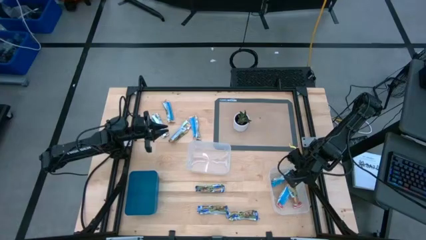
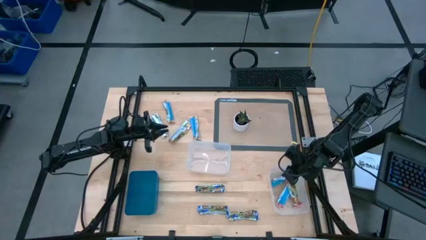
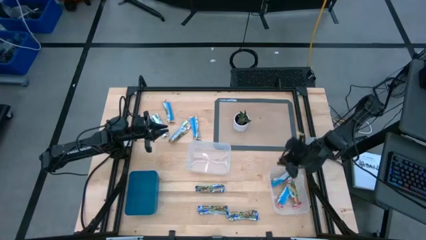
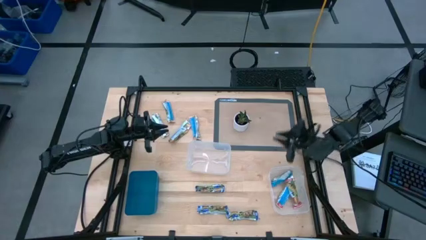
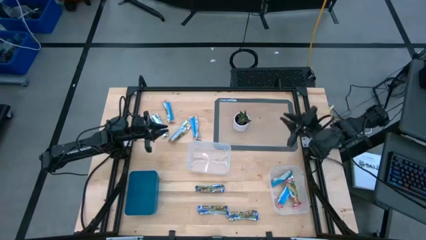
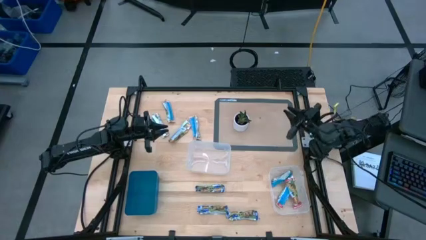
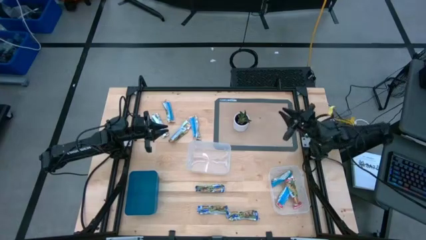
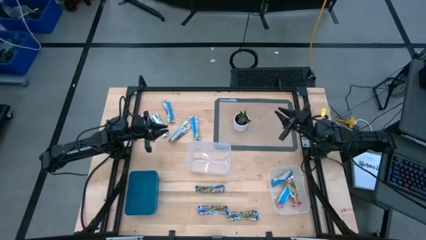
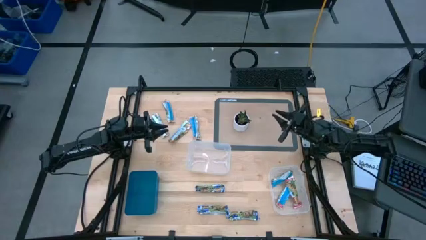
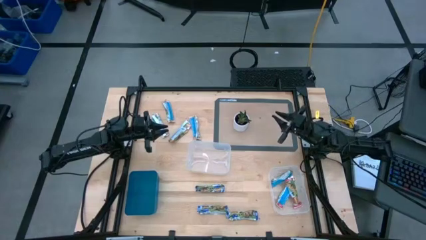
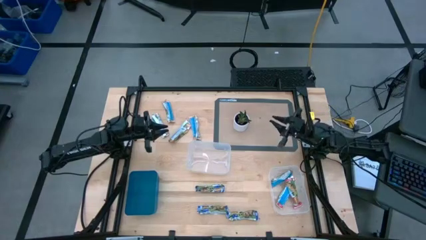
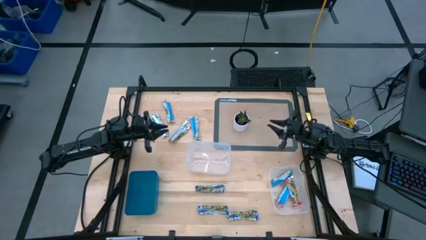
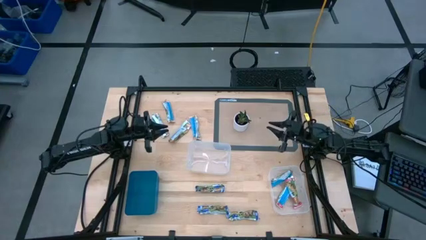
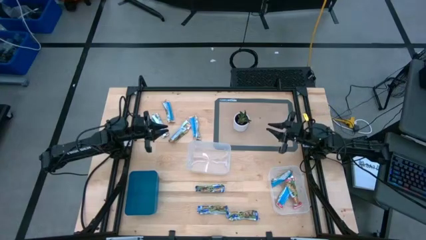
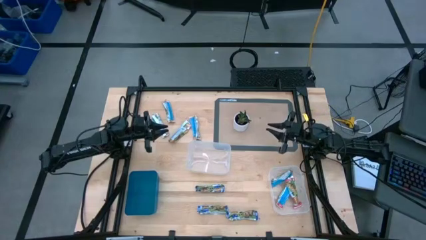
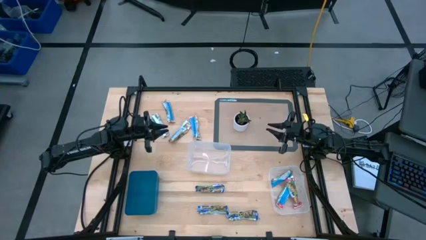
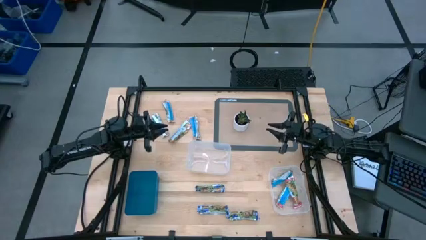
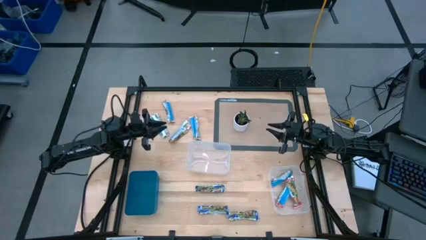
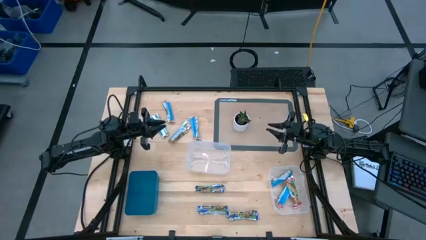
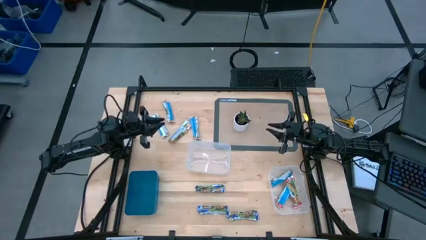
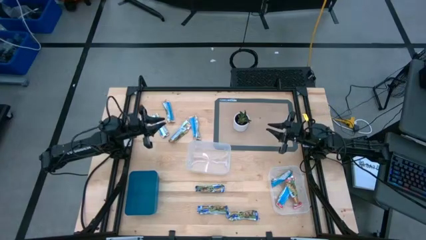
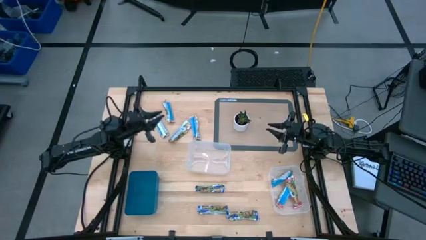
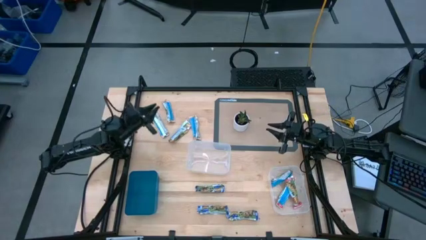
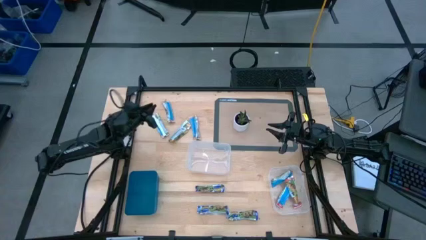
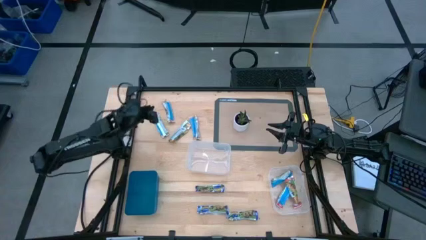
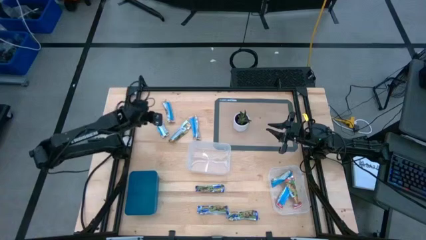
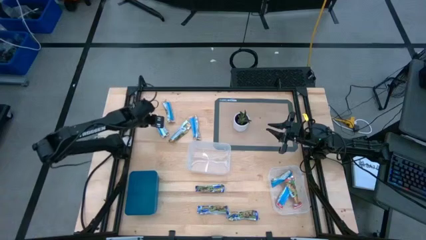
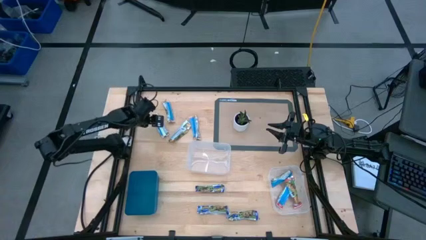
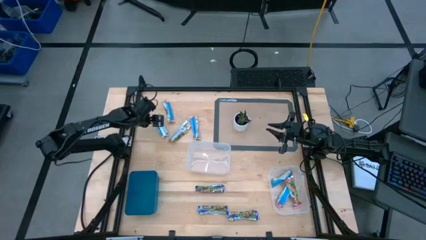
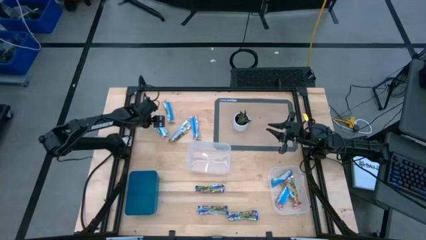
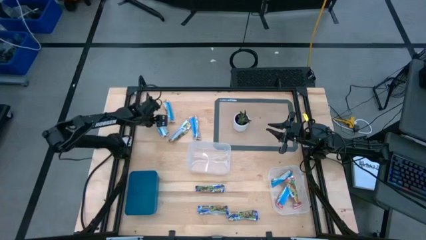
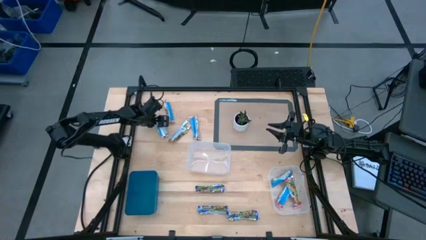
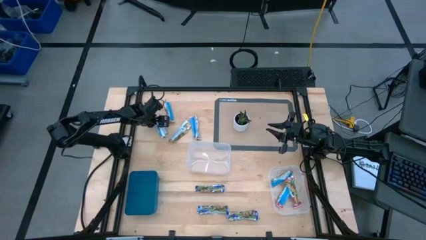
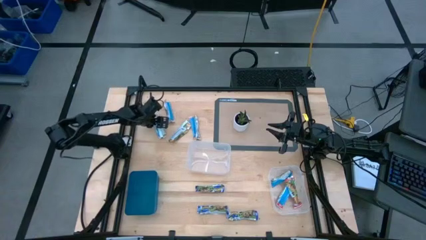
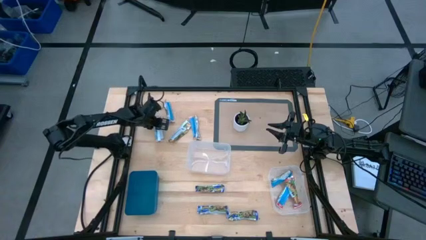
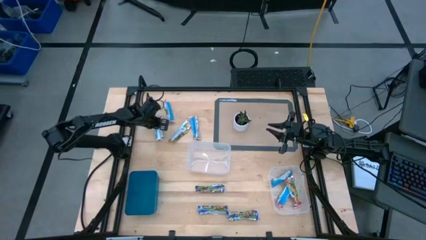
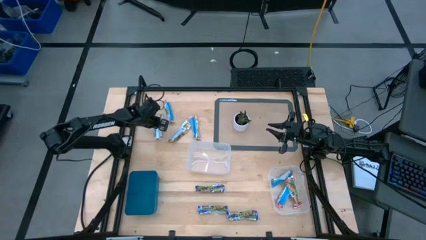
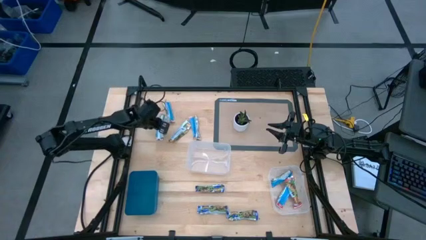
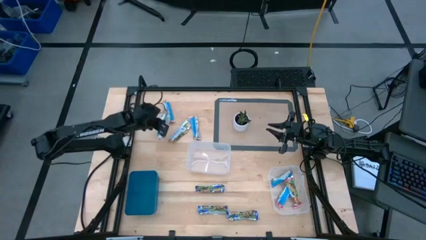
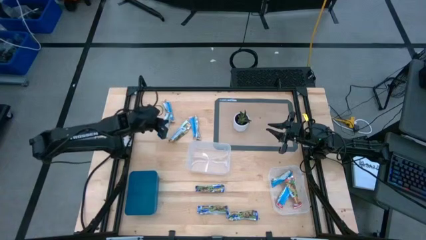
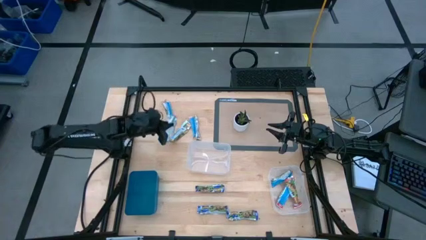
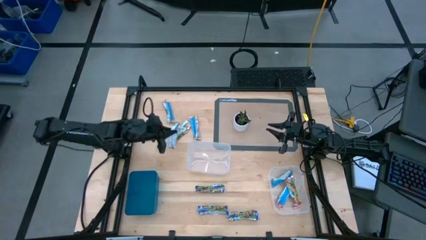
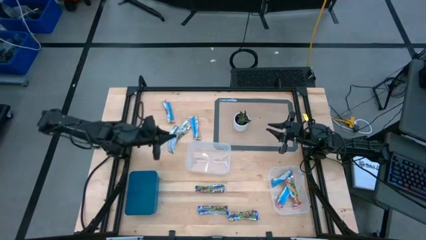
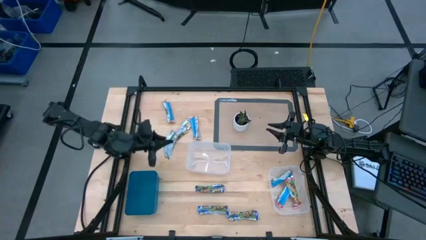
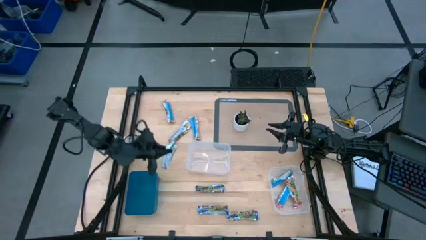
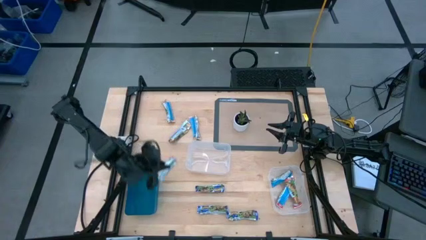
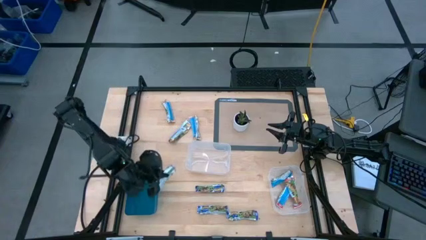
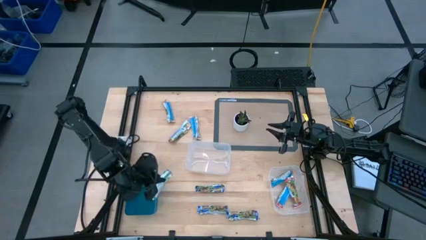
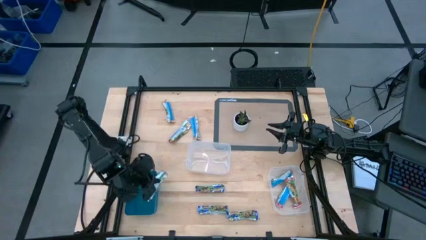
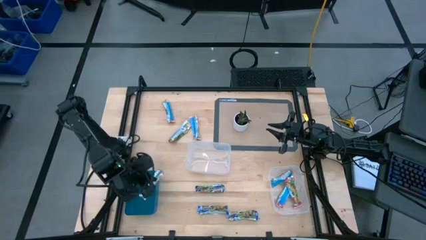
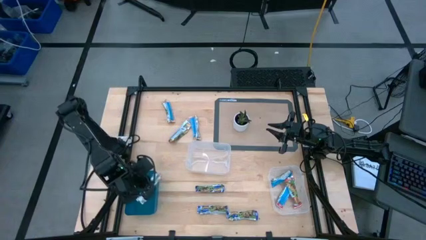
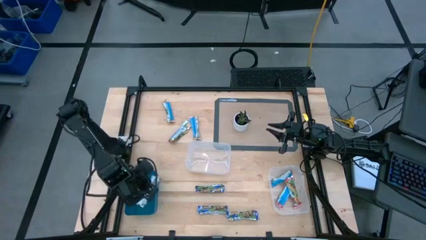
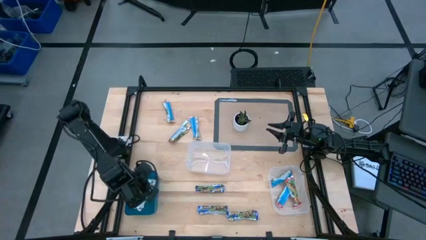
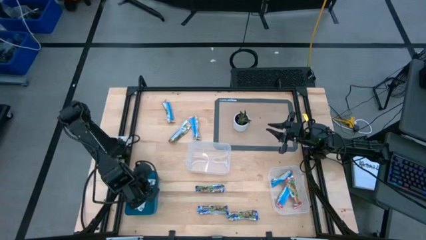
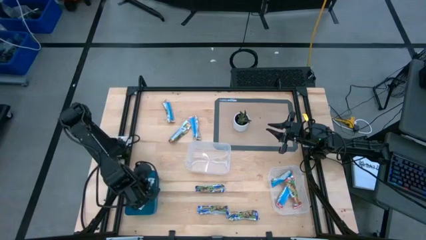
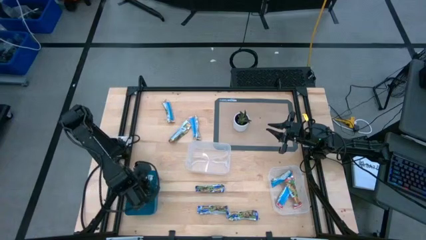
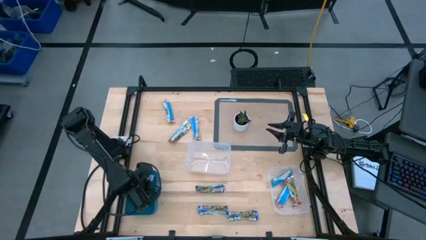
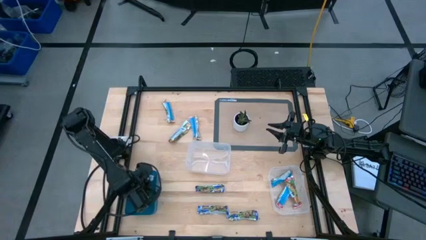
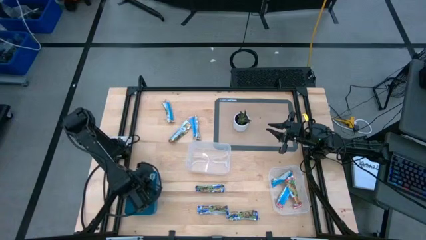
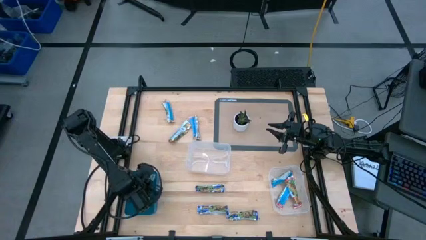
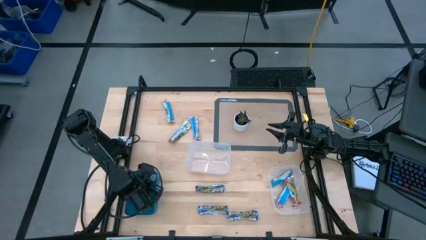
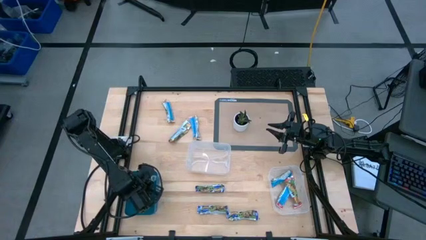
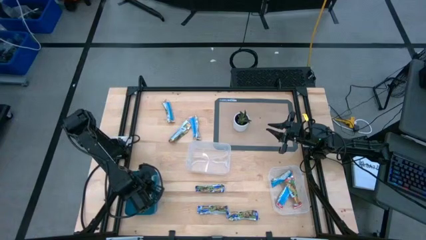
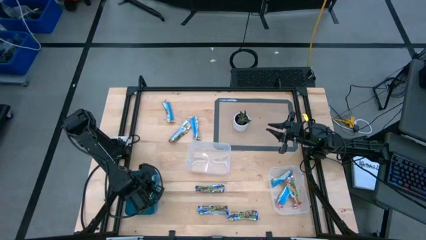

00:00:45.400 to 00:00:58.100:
Task: Pick and place Granola Bars by type
Put the orange granola bar into the blue bin
